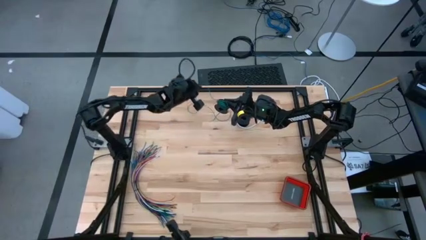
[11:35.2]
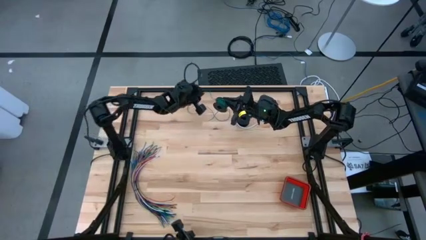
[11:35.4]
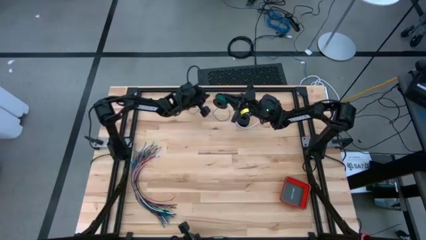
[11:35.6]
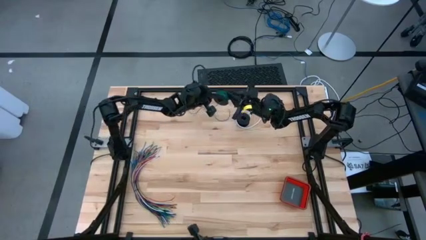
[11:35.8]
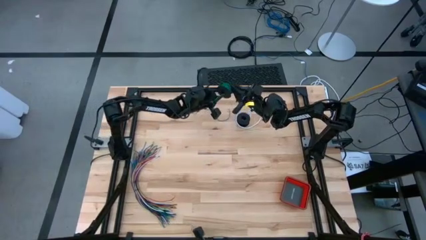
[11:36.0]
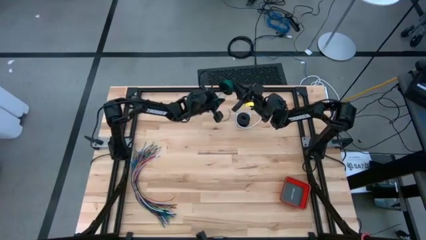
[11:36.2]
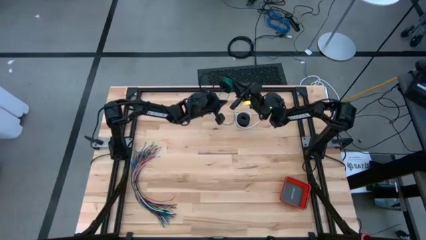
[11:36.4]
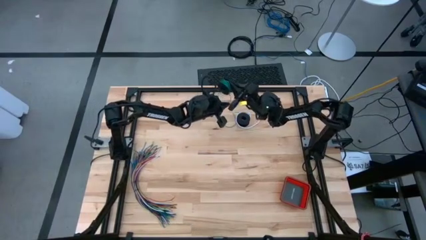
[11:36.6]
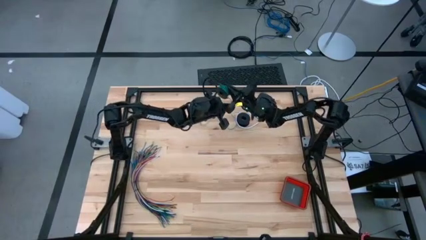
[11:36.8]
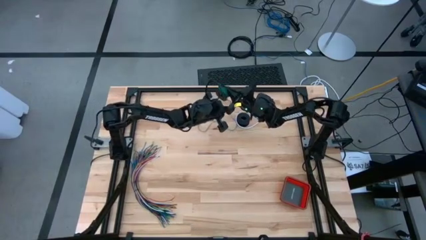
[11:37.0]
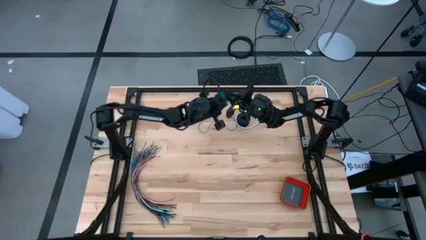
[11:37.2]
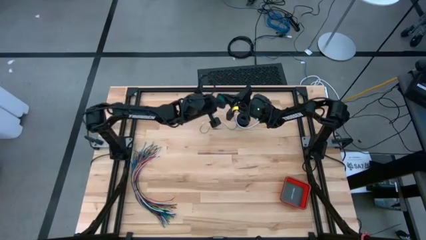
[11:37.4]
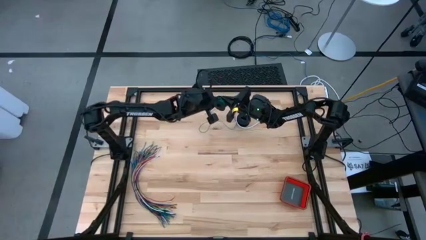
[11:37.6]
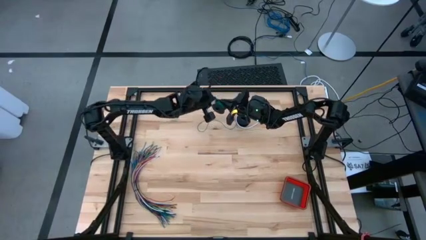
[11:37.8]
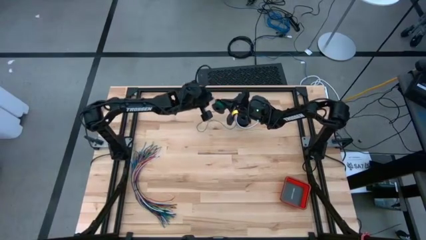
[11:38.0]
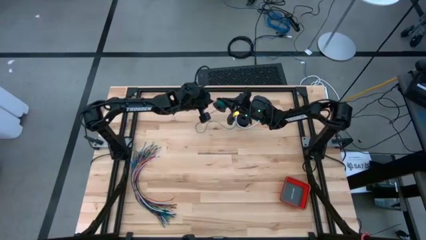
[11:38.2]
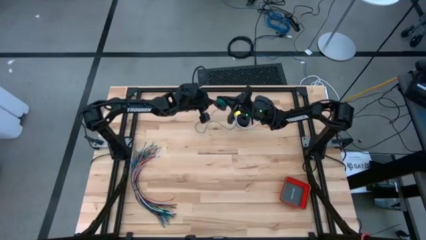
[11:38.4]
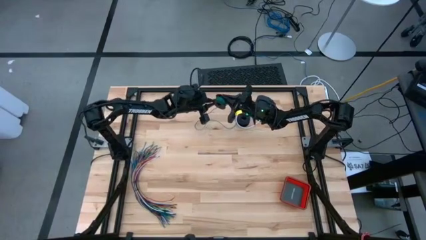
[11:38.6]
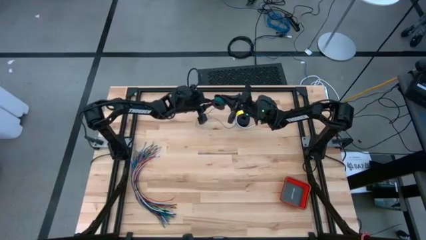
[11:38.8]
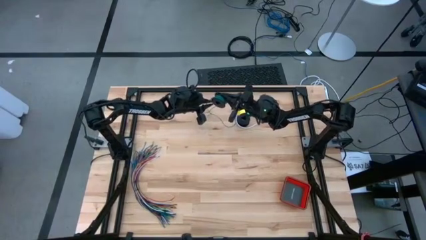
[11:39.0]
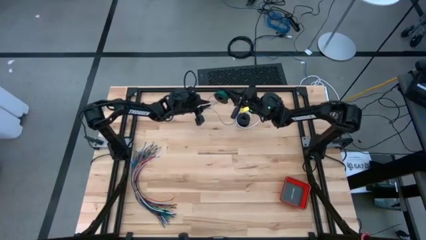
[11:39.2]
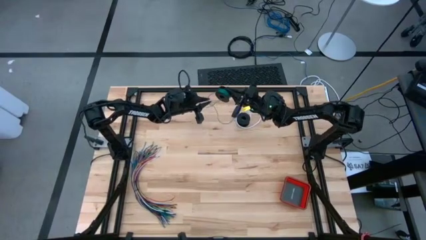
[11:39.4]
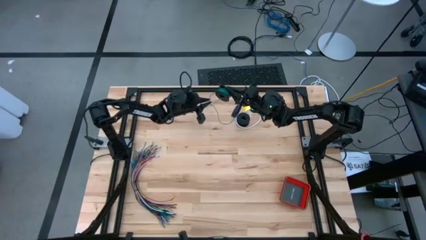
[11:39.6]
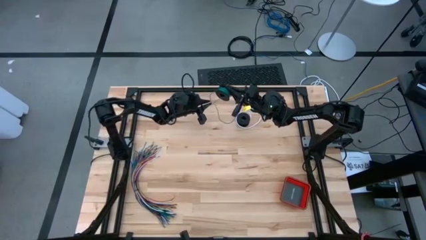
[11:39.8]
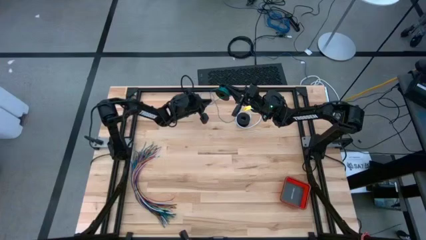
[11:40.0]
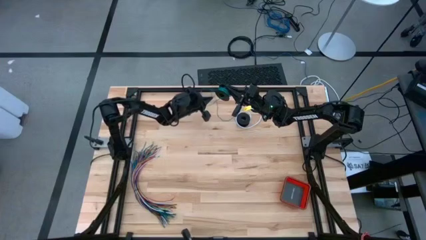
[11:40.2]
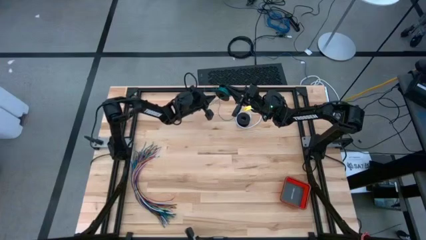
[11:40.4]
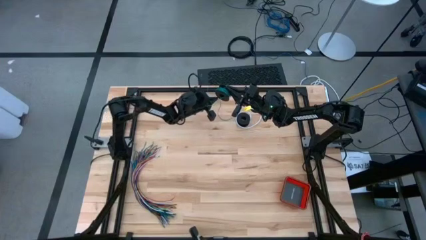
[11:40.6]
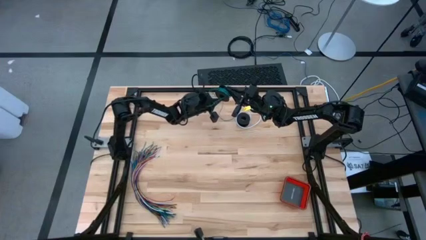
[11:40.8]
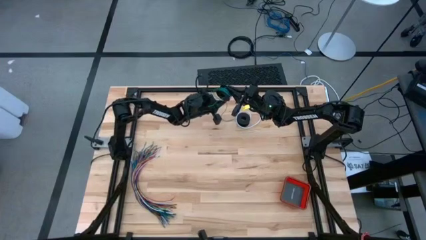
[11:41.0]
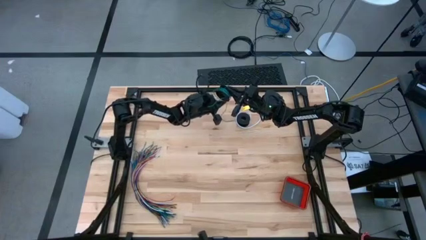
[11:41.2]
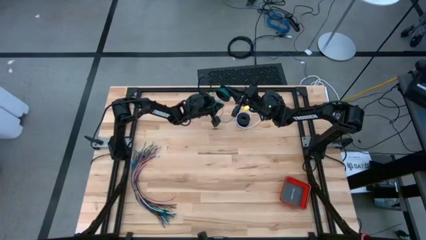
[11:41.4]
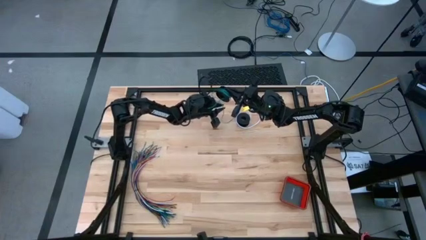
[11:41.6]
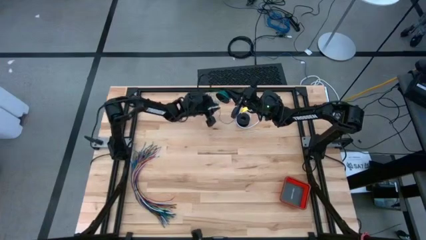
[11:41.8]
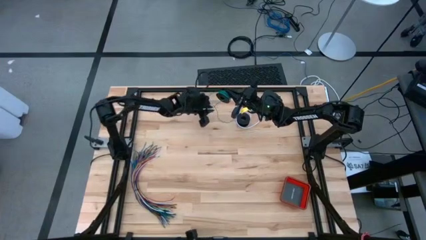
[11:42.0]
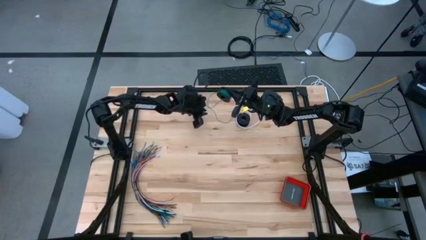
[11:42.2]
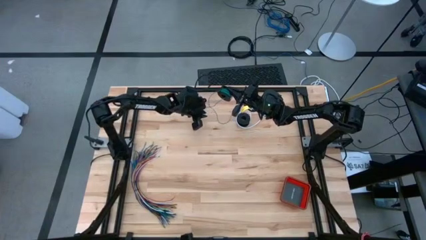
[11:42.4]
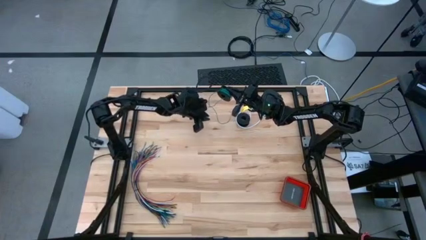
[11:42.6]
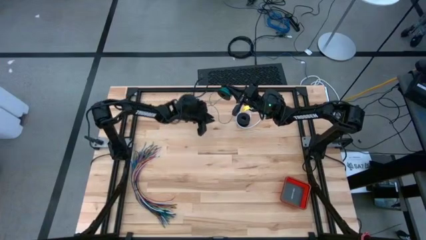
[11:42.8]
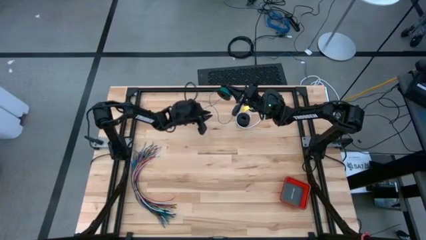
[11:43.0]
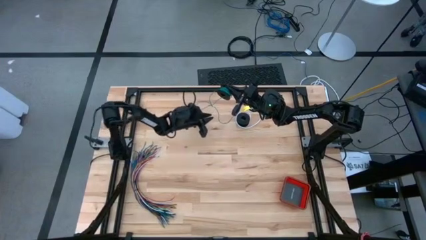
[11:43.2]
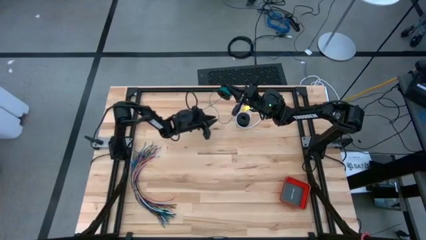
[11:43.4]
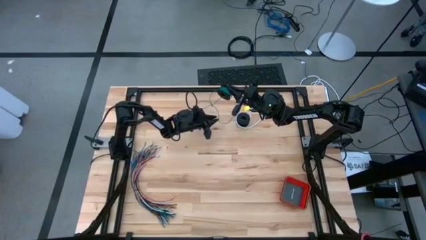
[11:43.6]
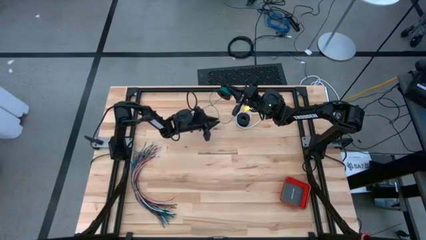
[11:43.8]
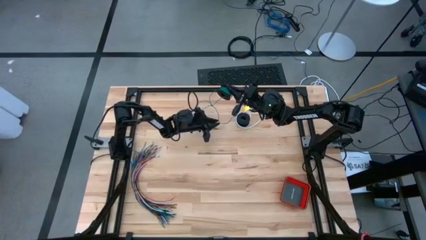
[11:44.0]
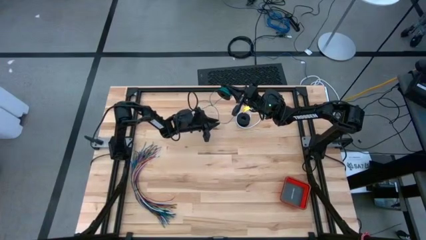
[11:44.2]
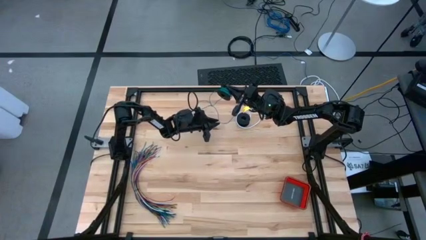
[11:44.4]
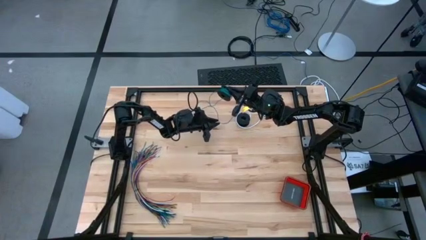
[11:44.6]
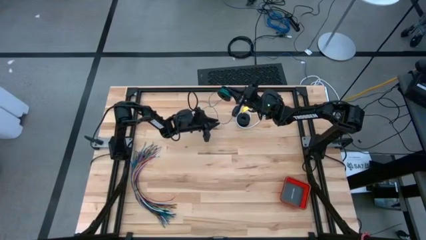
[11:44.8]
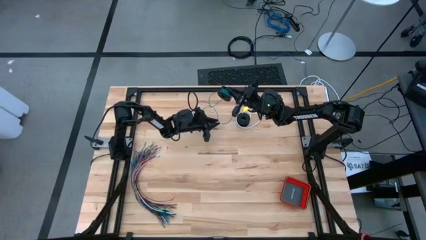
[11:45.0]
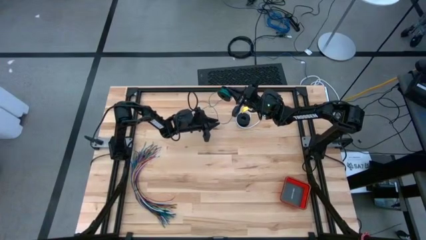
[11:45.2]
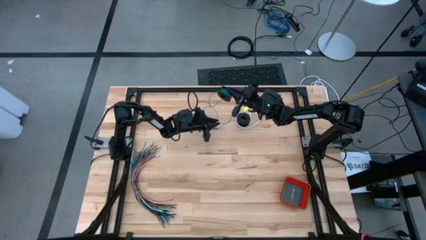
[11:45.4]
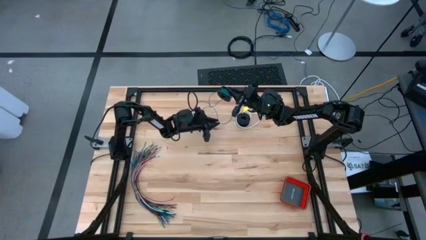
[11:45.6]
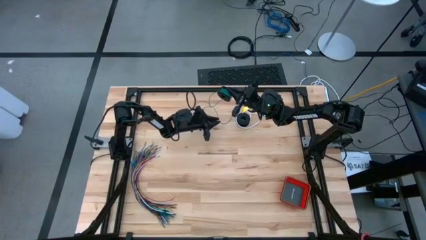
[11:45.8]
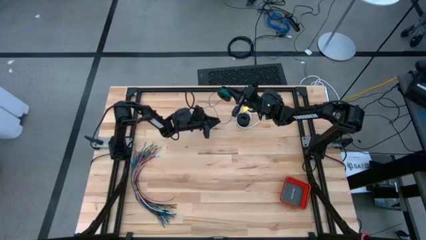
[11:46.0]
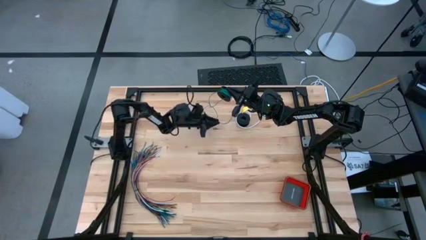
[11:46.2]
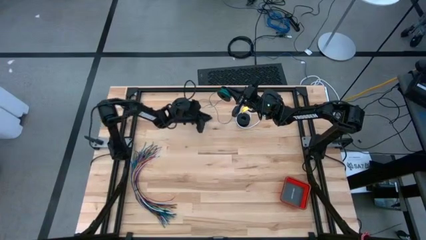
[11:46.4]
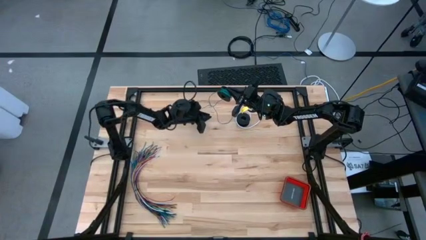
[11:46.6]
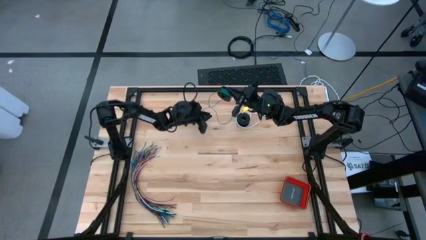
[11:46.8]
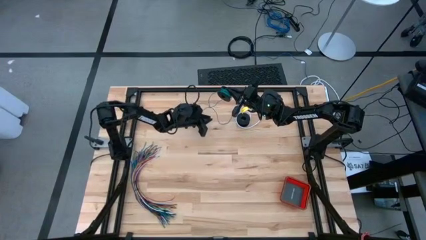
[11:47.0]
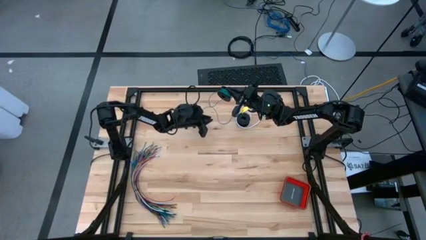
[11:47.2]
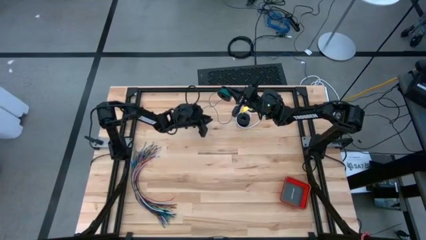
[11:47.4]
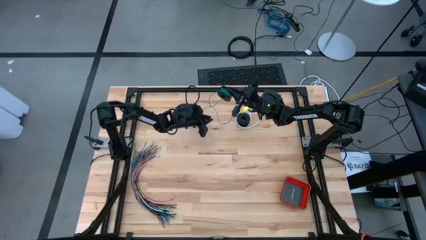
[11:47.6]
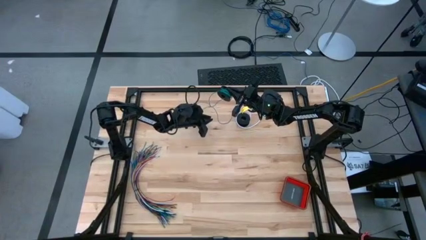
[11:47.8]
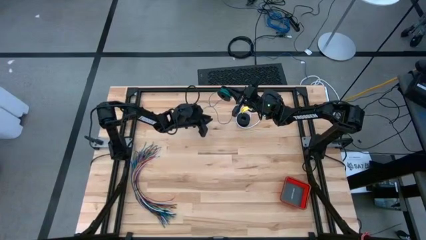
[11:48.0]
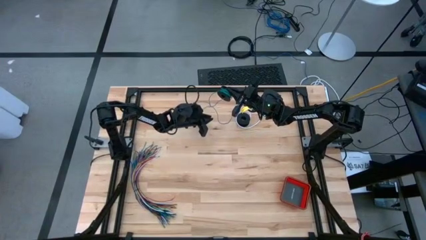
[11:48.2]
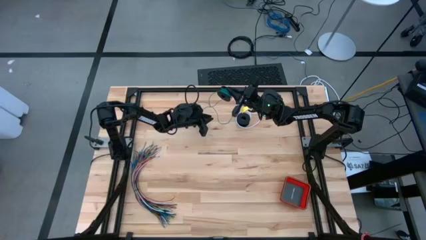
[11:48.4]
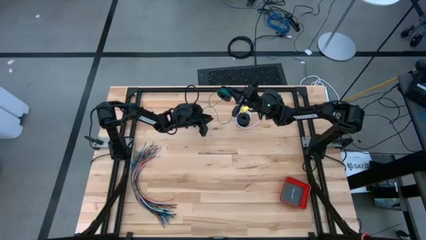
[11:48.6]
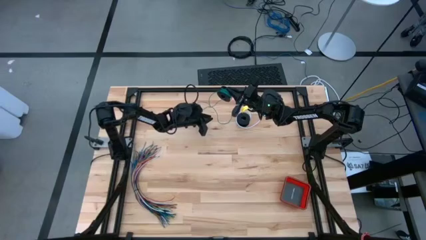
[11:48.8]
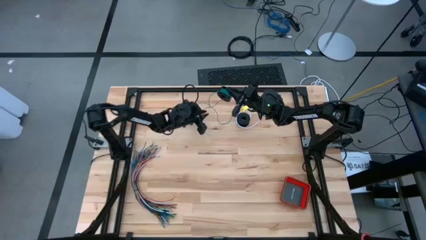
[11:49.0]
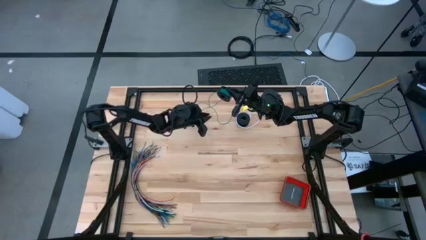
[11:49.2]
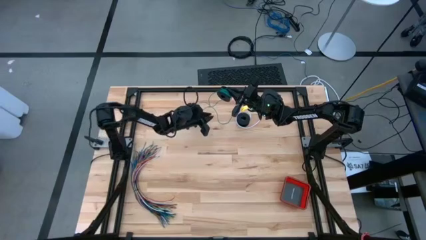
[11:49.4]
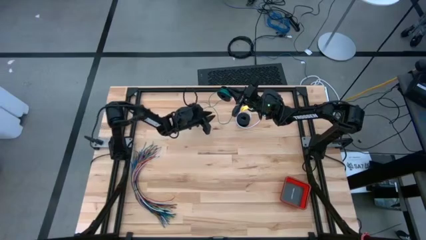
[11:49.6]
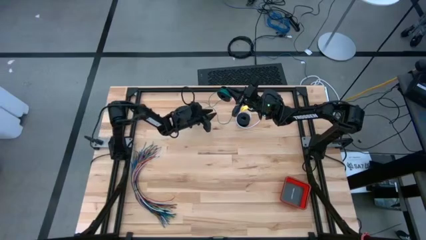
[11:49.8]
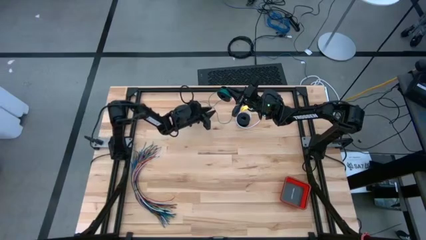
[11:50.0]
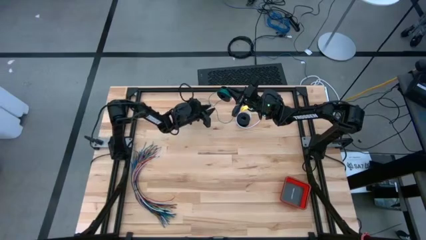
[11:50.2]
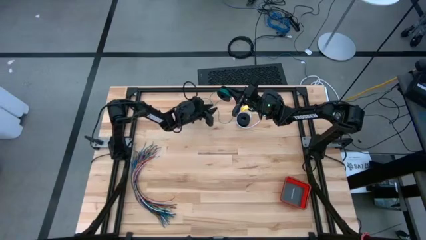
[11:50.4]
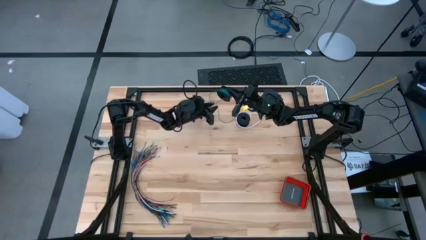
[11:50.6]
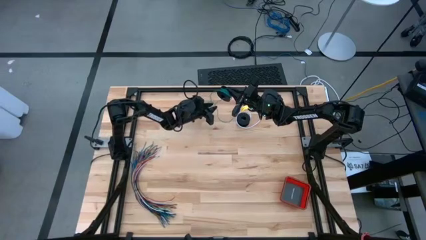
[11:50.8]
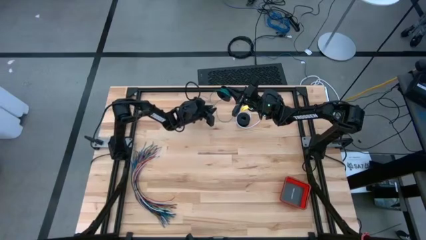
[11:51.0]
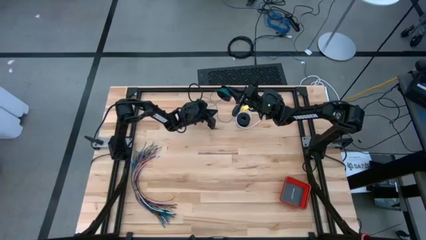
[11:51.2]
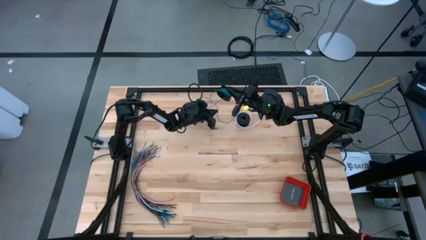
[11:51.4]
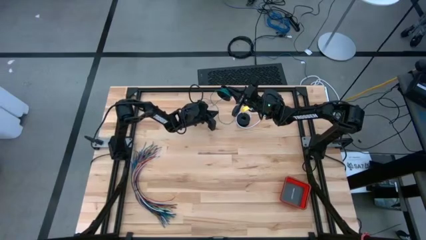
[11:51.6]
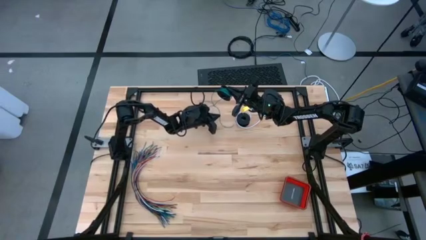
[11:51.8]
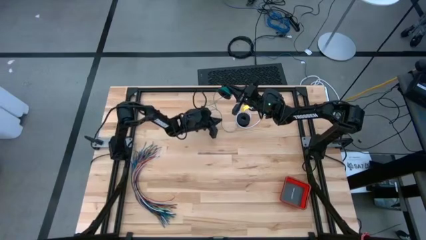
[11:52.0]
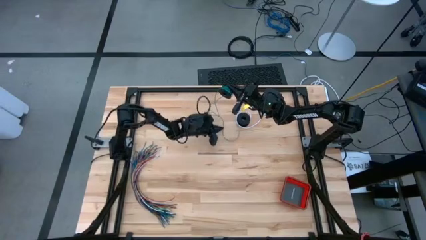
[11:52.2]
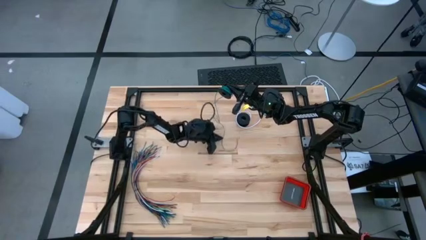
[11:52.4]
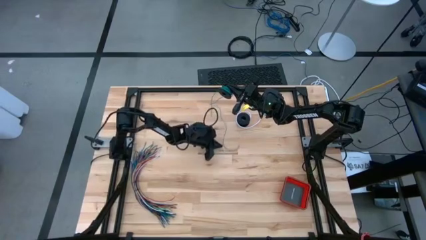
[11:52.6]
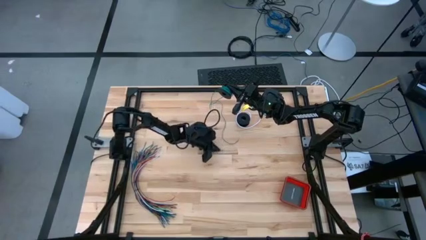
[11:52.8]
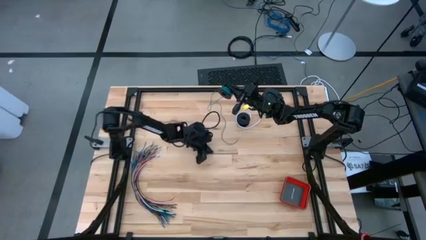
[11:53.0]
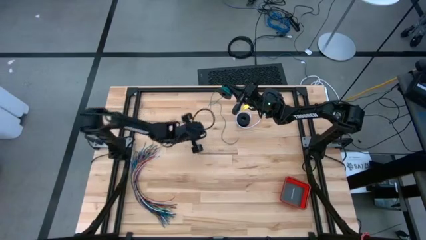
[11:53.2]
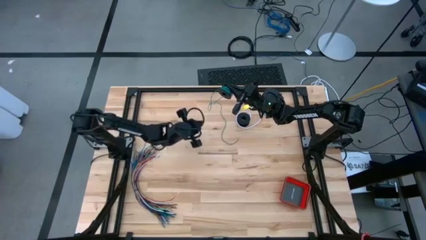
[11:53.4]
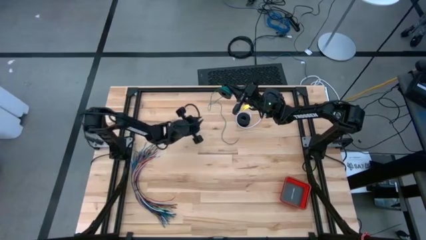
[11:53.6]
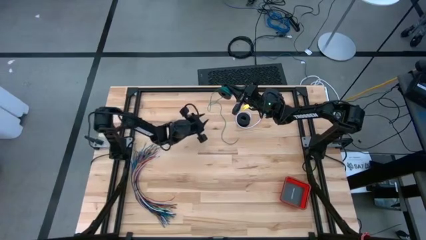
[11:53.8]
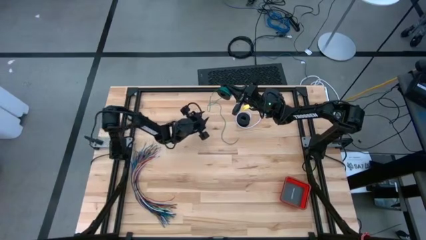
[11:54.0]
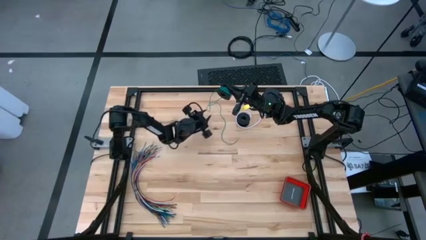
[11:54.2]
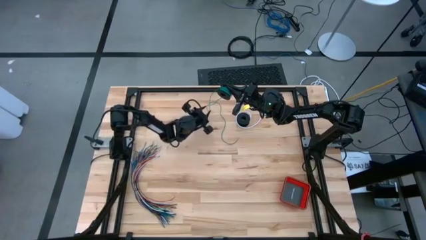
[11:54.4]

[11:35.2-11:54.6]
Task: Coil cords
Coil the green wire onto the spool
